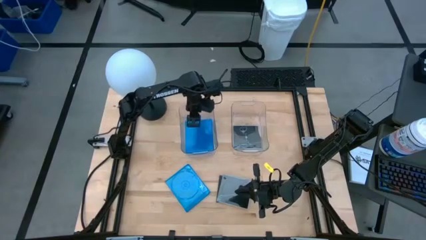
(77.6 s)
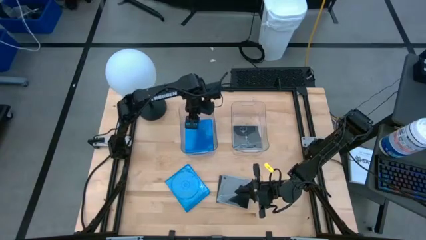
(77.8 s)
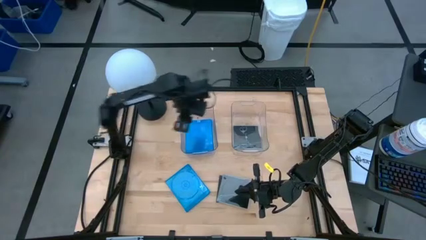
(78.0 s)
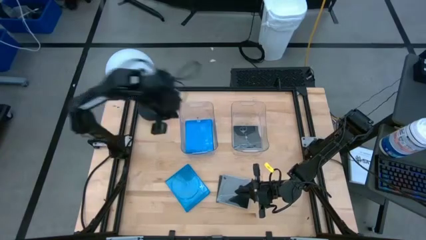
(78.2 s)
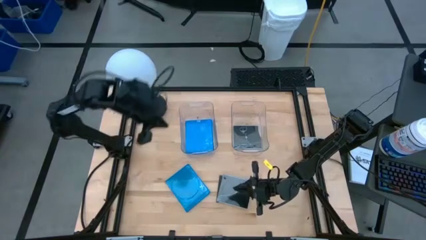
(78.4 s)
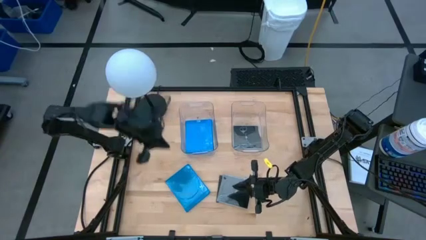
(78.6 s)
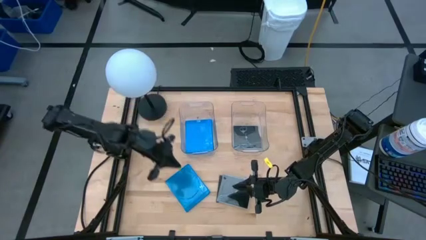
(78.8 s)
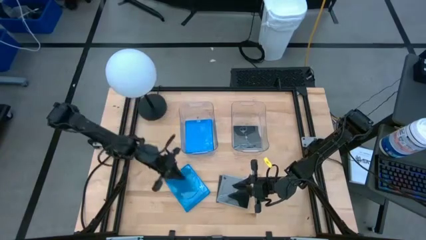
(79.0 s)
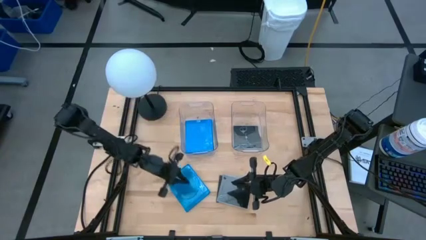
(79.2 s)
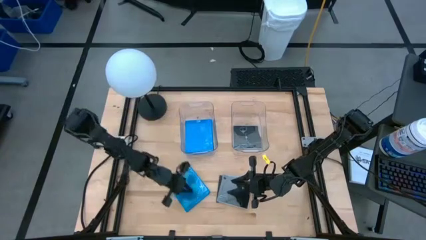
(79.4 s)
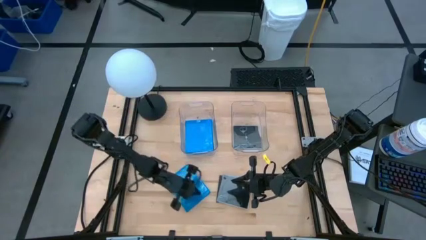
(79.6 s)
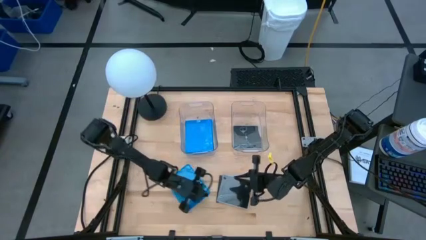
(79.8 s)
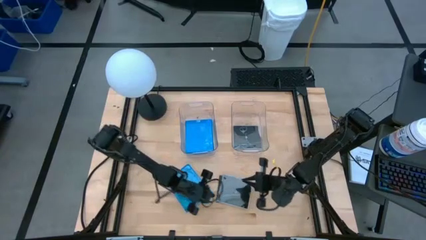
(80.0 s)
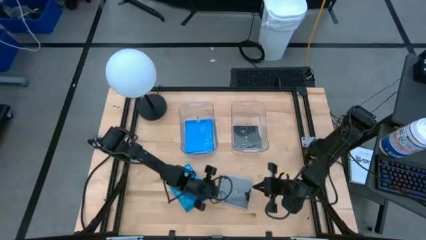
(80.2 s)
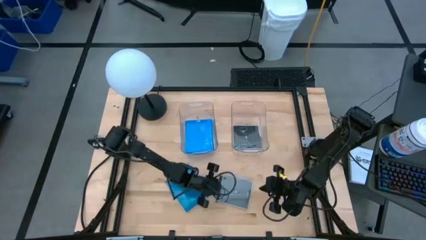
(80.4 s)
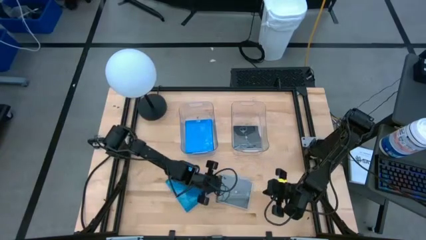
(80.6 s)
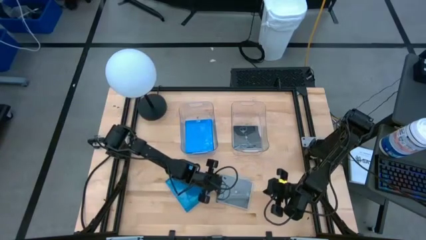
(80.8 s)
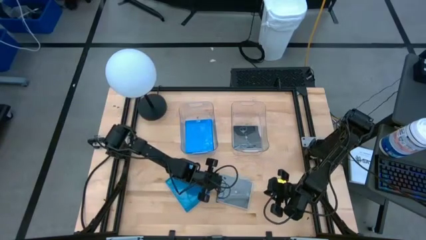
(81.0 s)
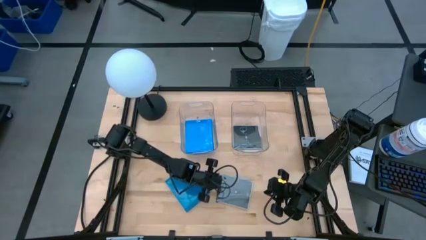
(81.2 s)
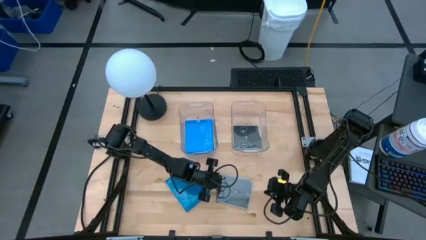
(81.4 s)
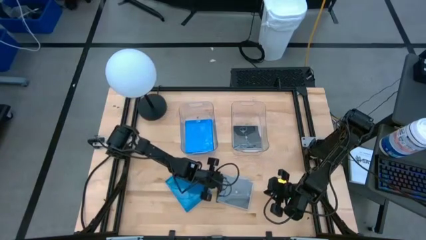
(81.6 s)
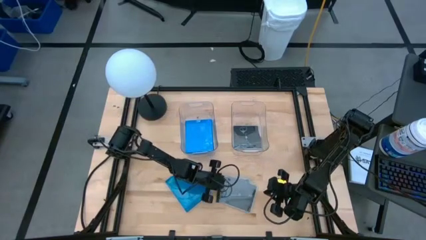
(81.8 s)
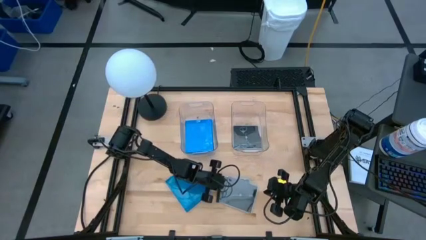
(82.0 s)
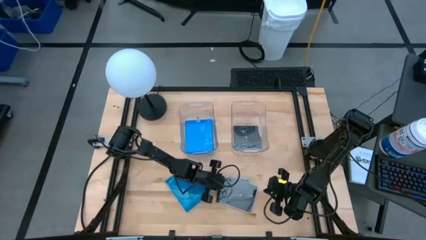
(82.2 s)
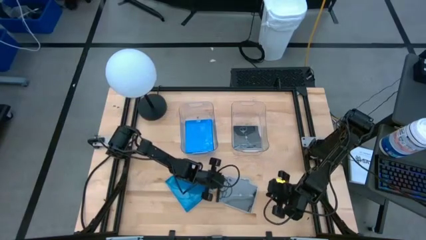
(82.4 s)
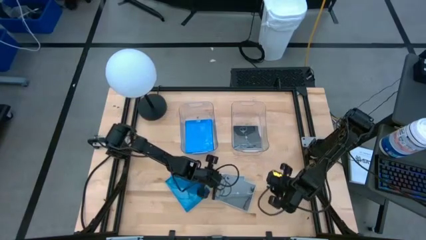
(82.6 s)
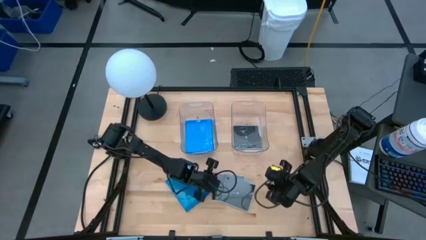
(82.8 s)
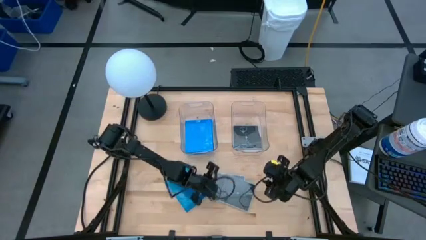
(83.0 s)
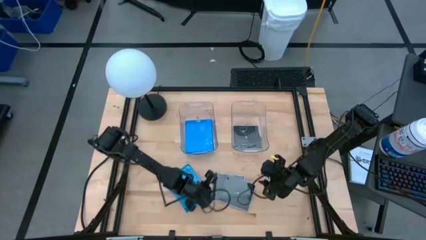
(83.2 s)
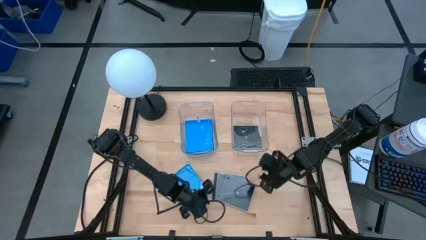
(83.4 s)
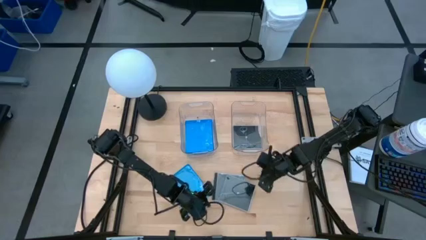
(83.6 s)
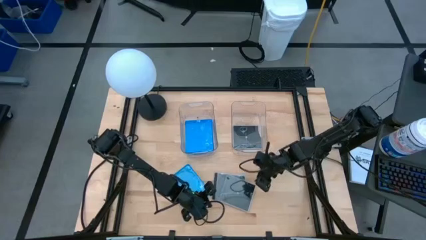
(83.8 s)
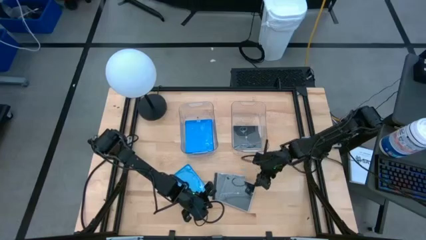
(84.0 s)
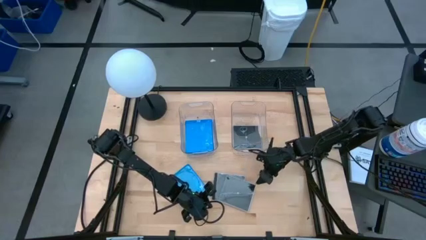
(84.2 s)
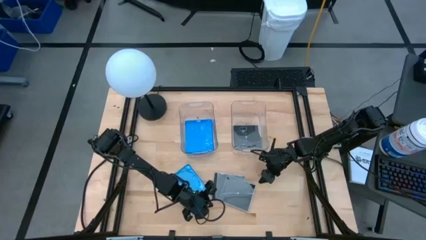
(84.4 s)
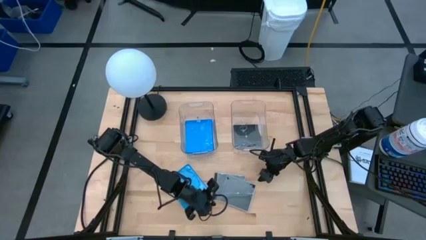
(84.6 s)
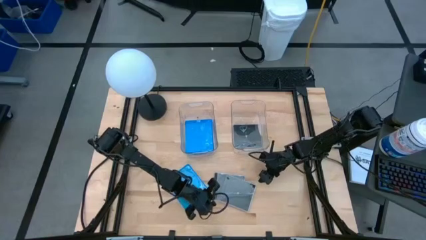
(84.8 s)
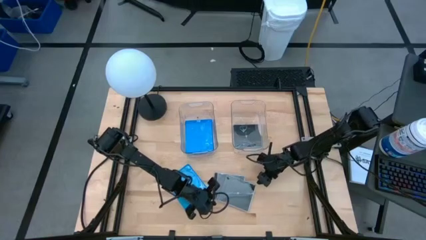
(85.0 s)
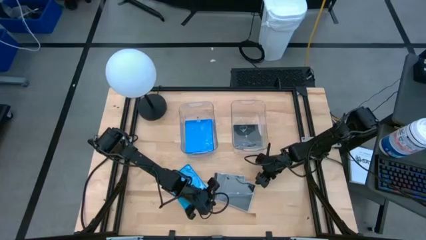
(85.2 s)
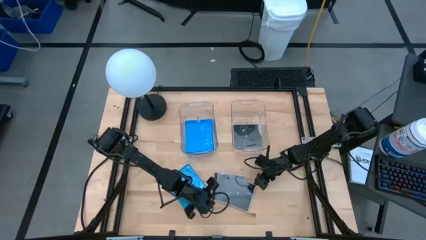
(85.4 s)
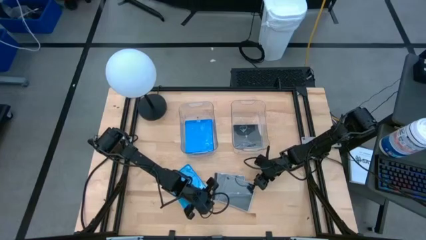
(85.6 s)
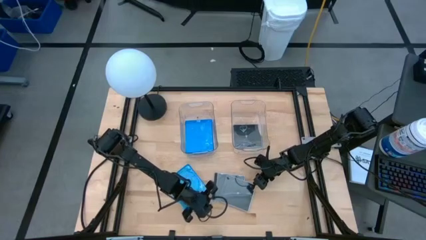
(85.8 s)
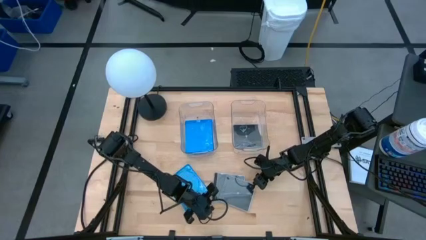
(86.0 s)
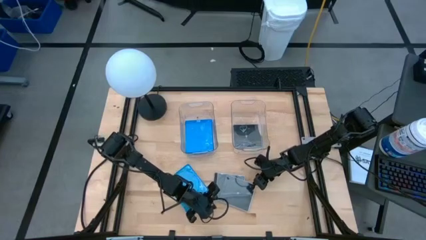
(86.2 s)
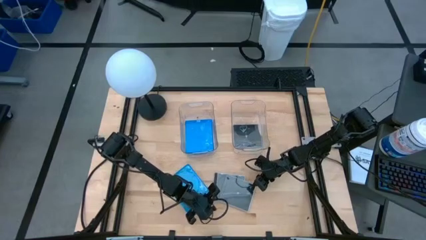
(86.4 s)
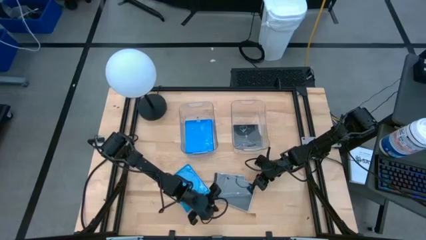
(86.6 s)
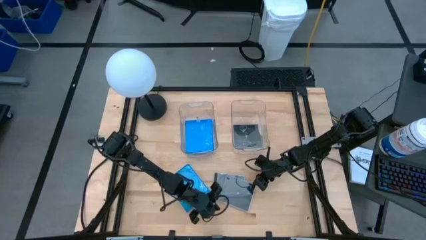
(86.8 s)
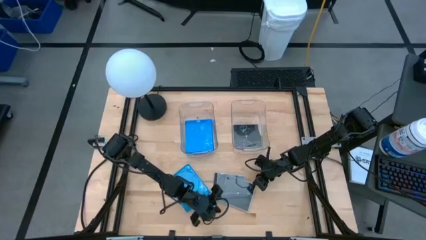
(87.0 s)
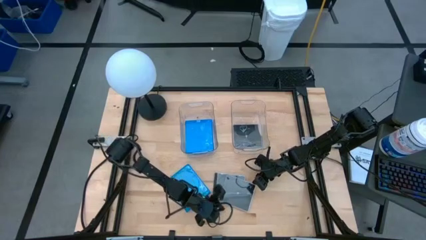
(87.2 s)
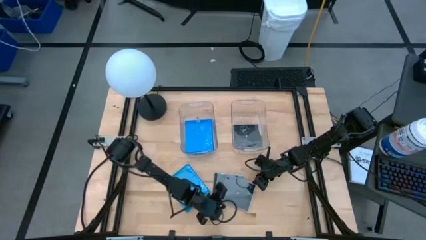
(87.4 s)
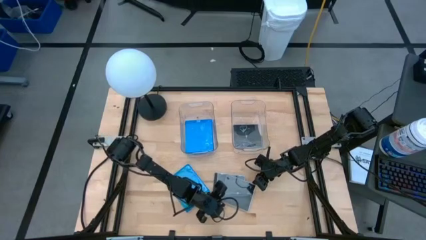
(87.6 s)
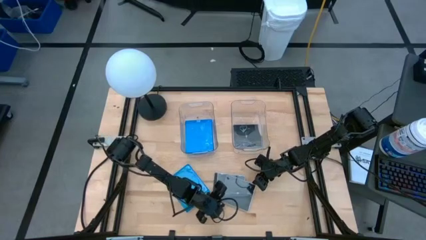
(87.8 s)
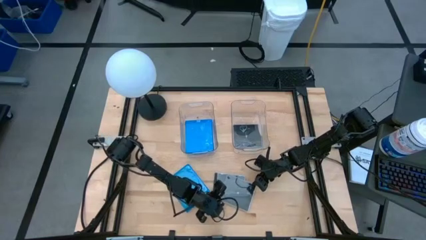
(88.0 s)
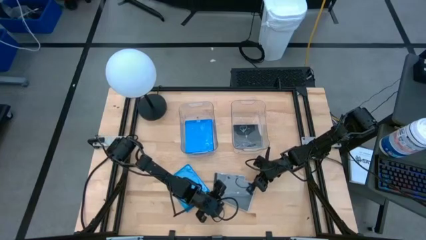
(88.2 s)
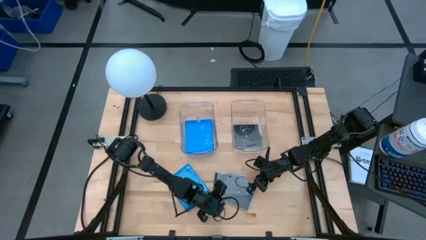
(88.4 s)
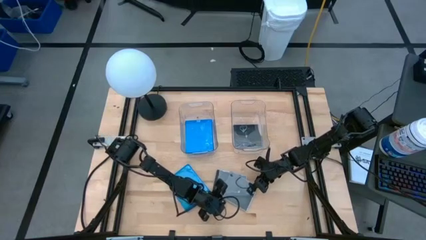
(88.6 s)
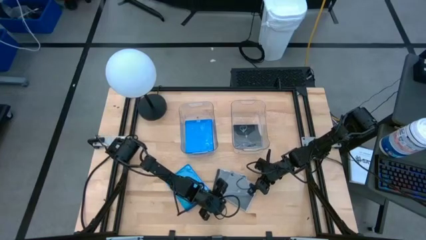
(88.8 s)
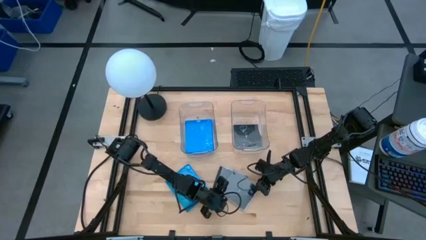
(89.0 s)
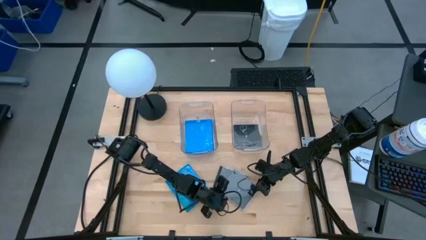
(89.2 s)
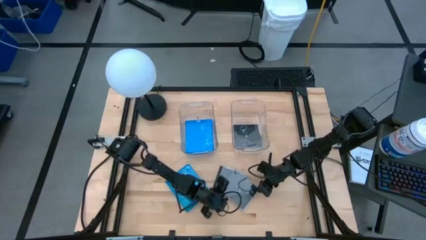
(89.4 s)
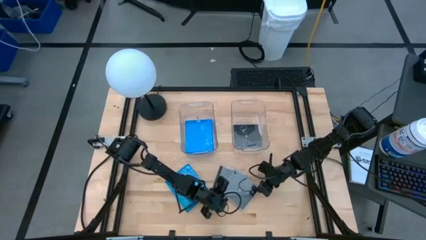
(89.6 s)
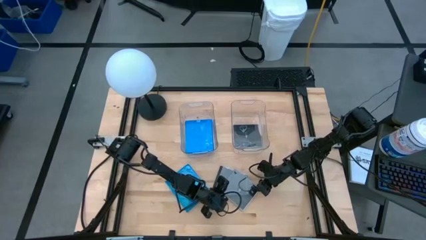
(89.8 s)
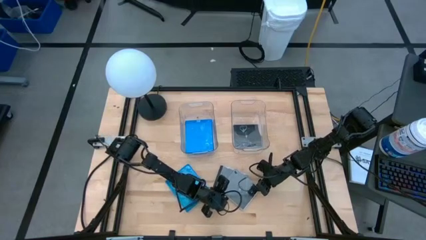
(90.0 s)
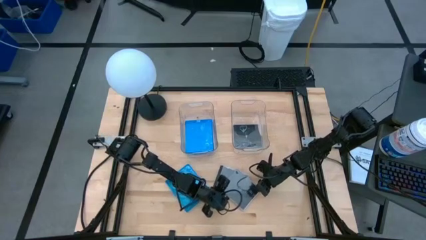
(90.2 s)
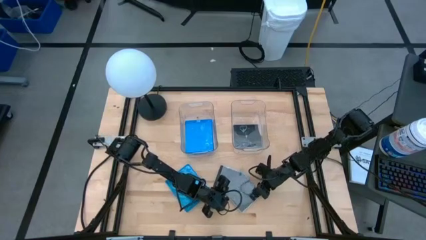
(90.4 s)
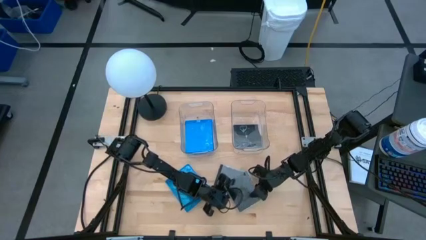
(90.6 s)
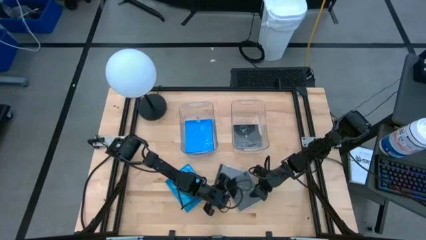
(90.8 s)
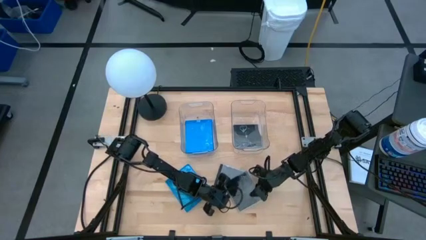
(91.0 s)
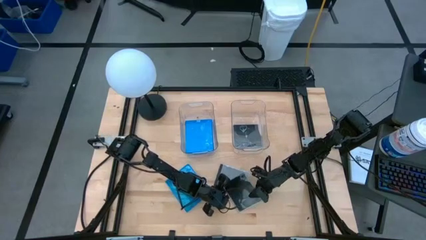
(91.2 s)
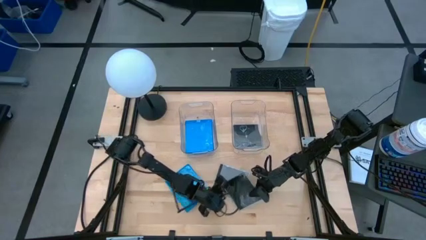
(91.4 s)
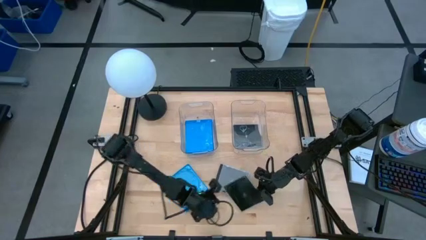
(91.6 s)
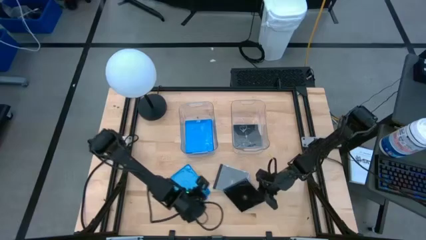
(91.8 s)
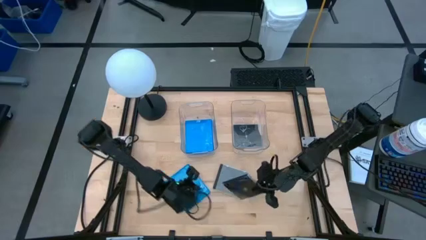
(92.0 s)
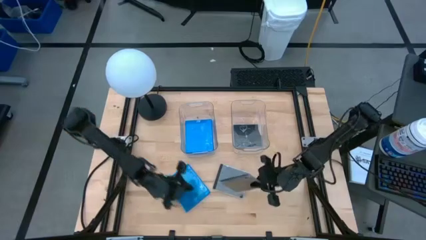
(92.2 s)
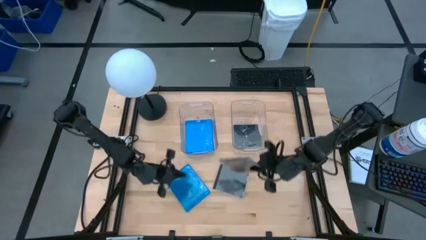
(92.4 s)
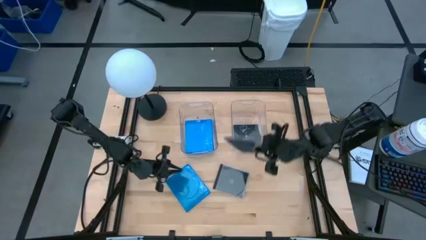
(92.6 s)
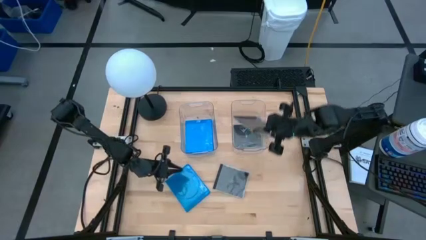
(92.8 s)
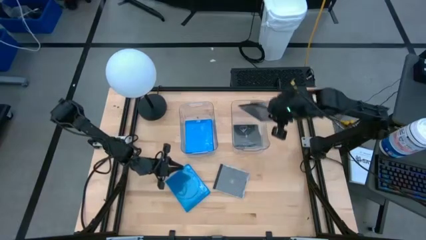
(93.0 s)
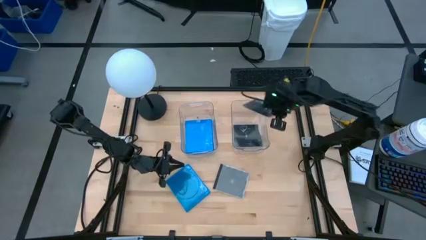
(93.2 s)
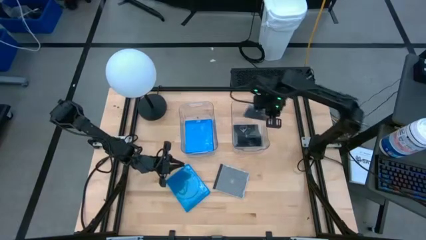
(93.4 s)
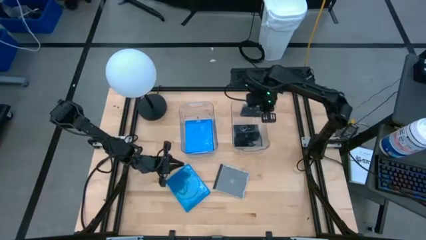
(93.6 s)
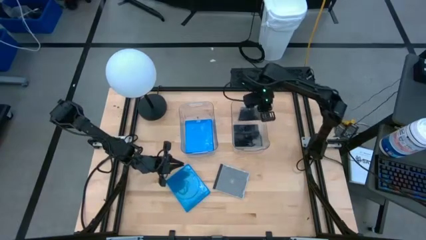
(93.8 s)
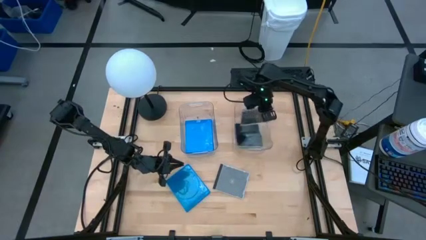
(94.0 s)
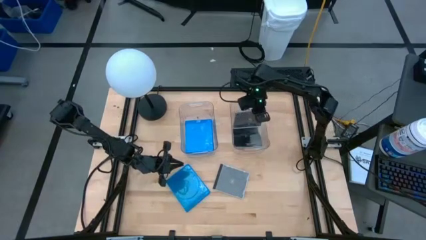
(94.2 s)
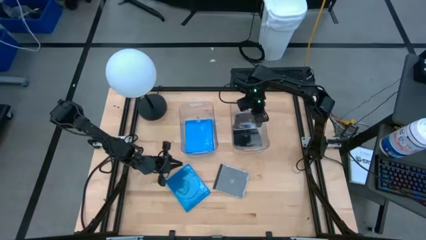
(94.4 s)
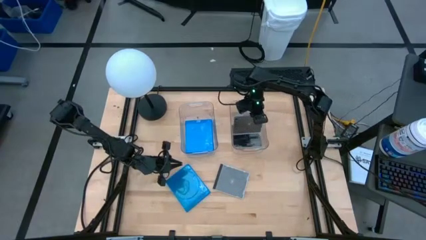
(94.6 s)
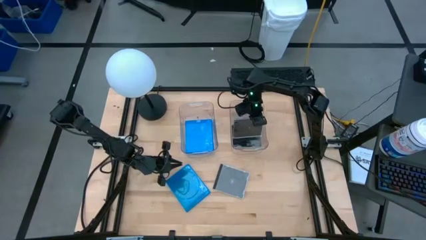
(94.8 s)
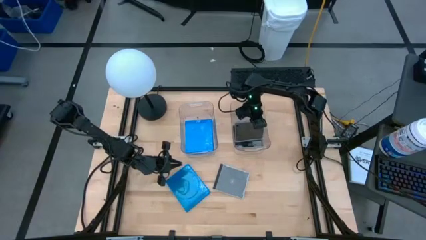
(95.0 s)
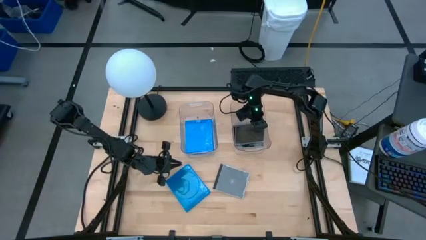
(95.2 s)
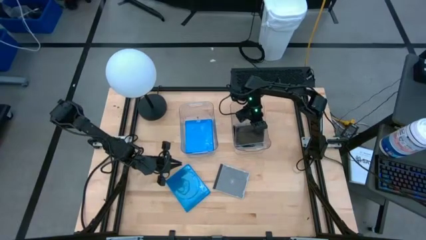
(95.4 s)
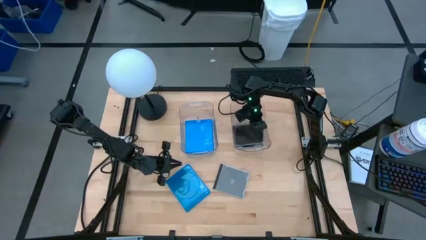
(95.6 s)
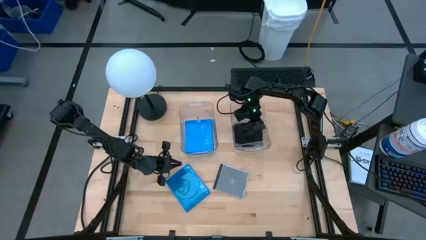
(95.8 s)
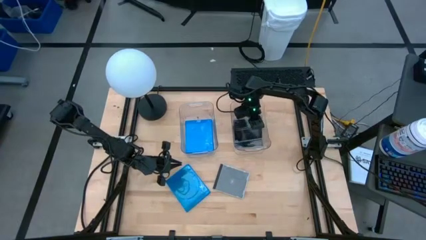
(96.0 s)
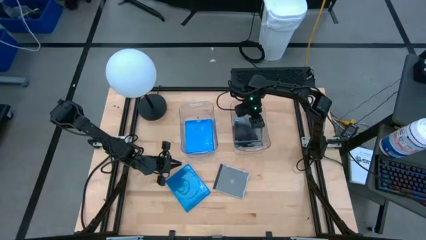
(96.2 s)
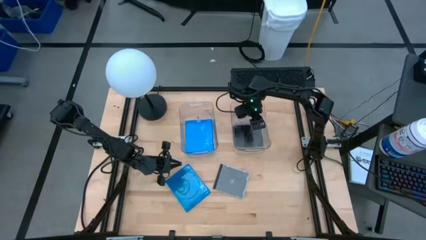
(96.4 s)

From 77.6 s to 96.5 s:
Task: Pick & place jewel cases by type
Put the black cd case into the right transparent bin
